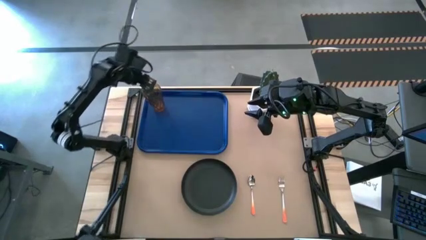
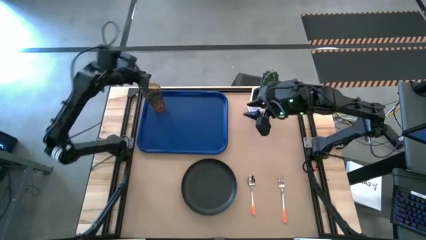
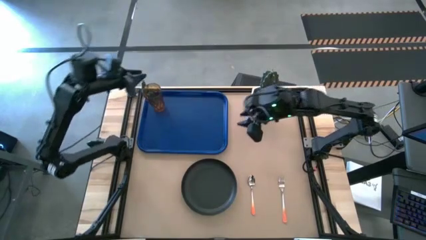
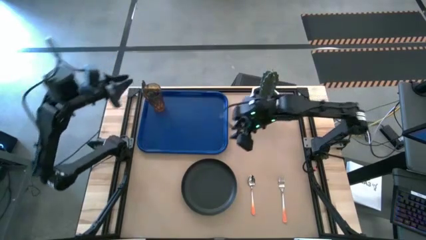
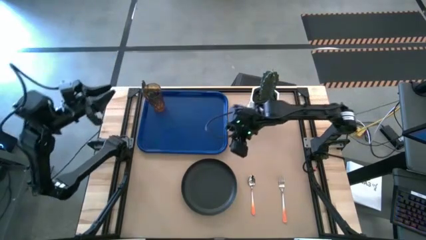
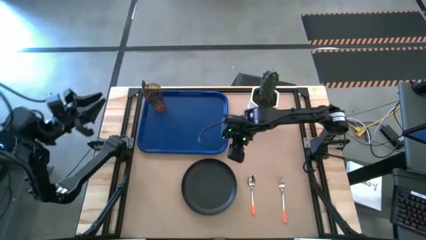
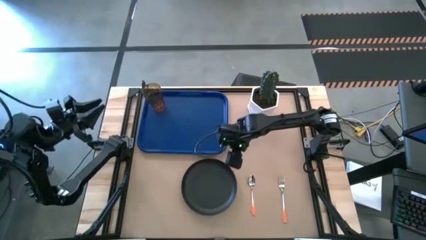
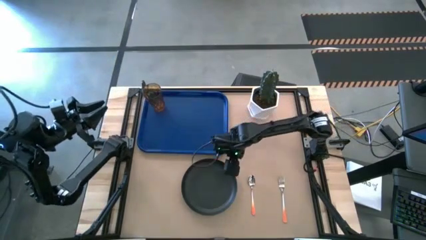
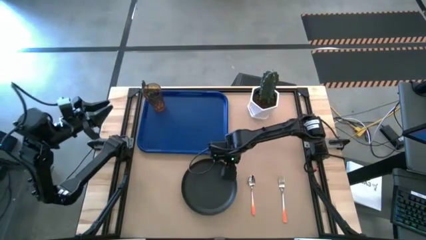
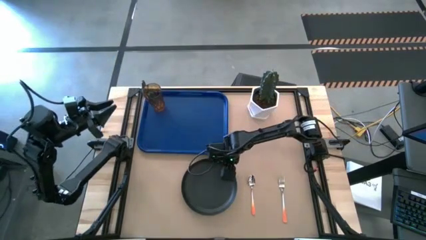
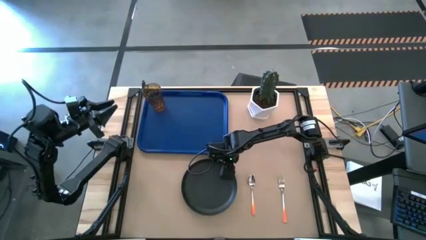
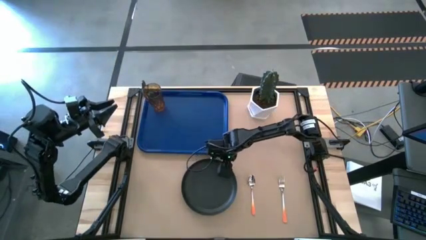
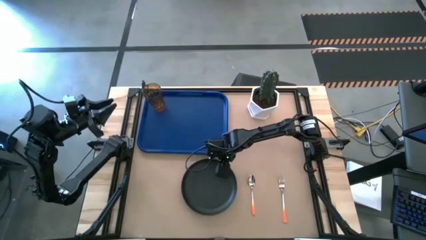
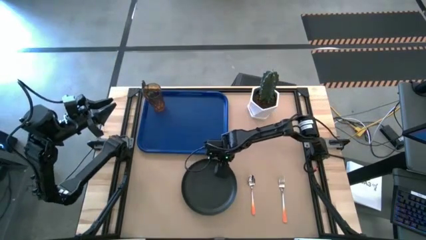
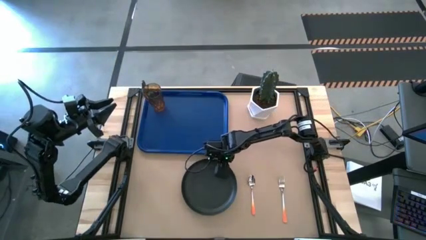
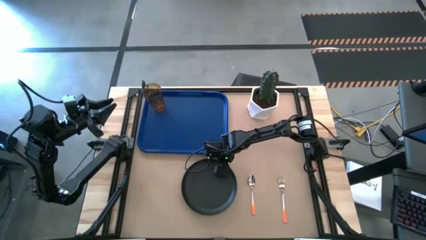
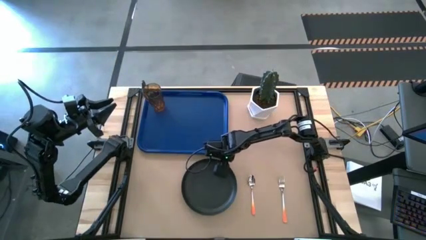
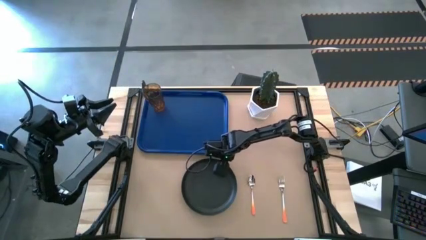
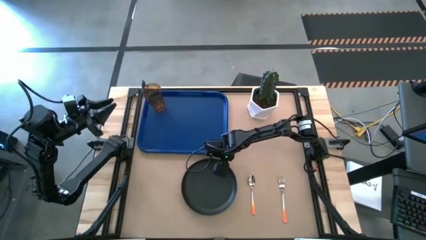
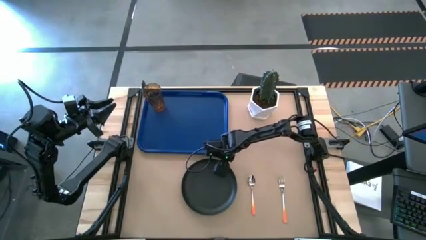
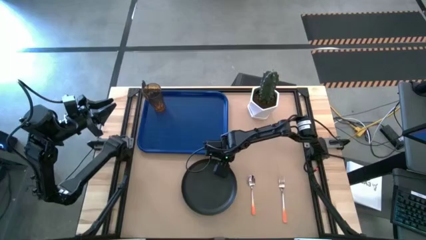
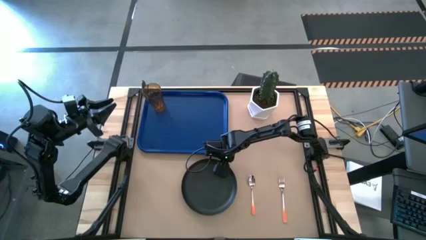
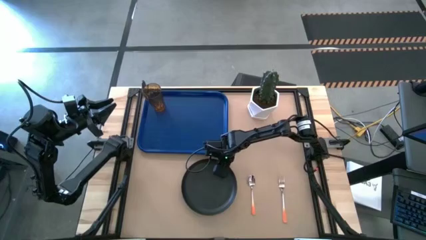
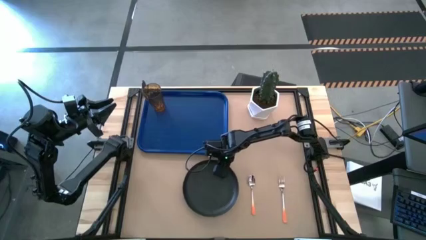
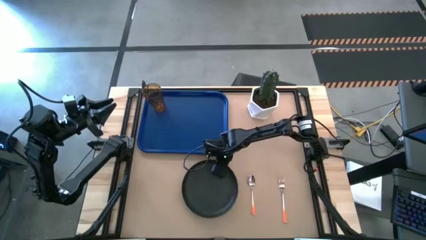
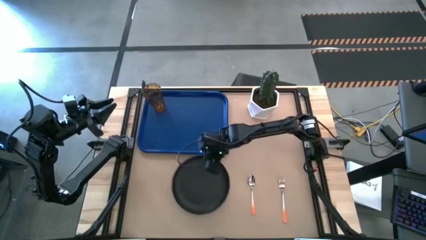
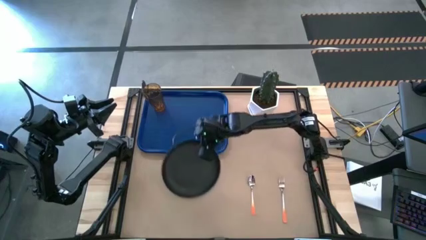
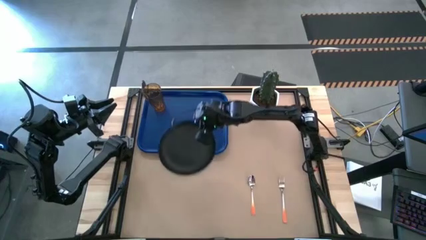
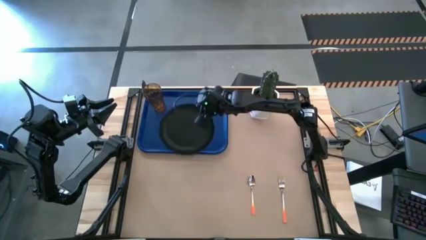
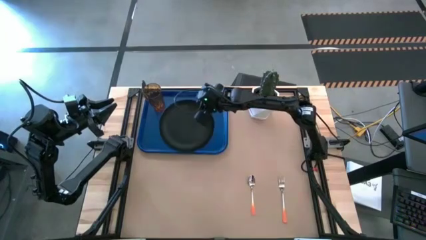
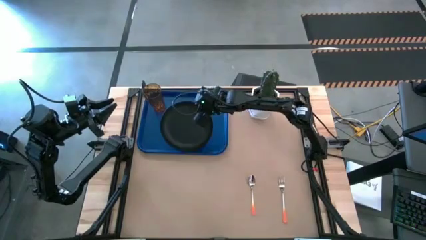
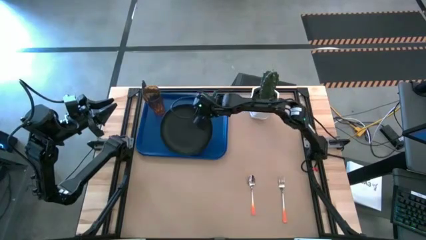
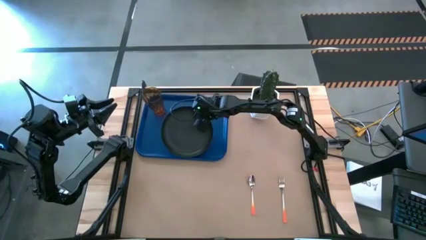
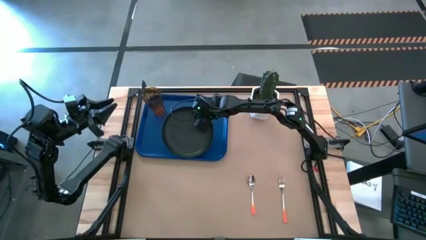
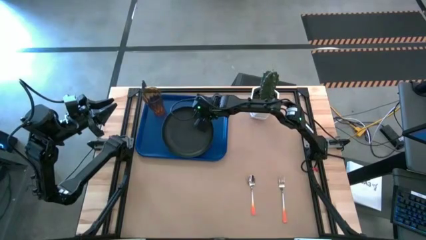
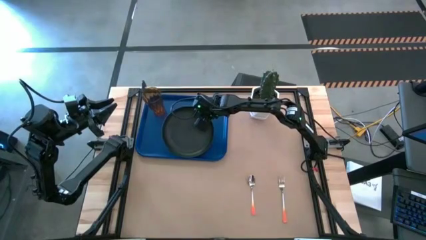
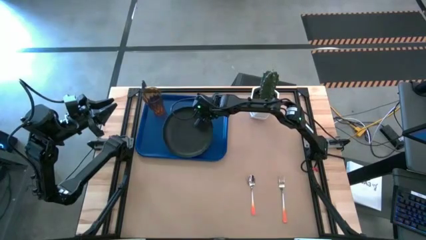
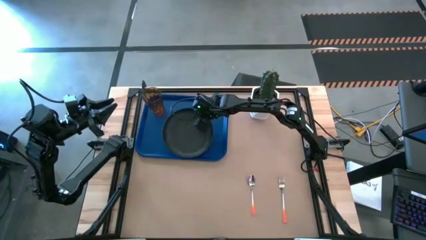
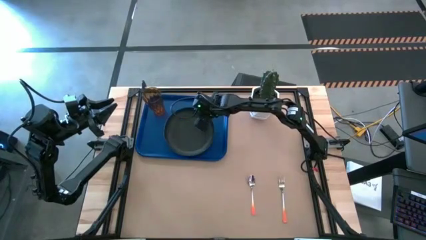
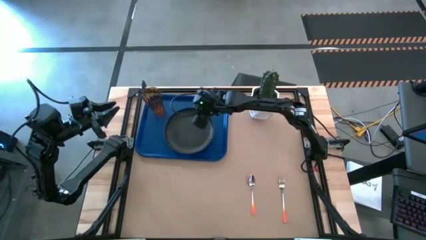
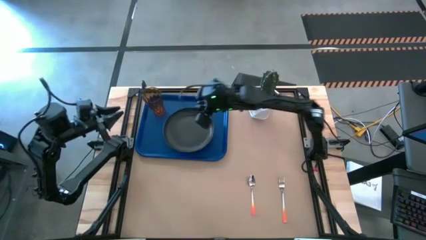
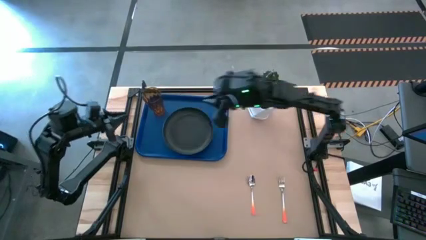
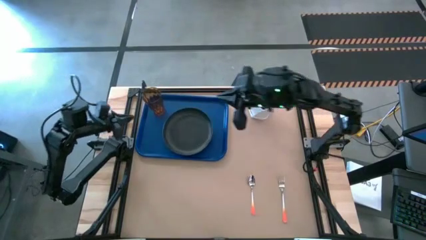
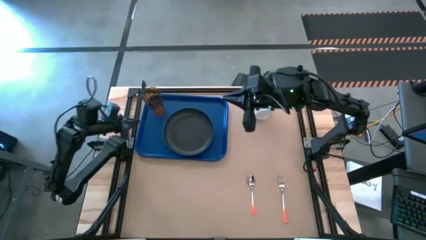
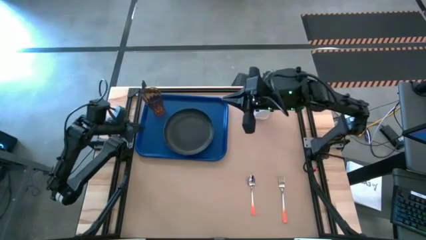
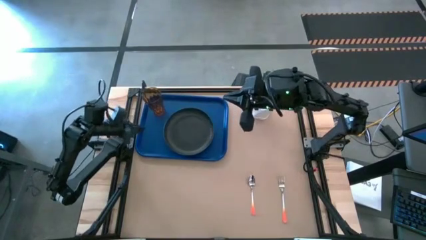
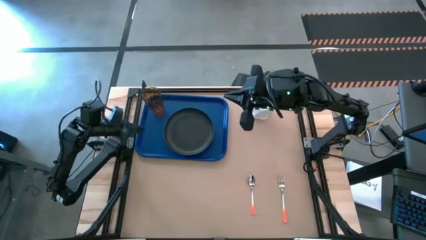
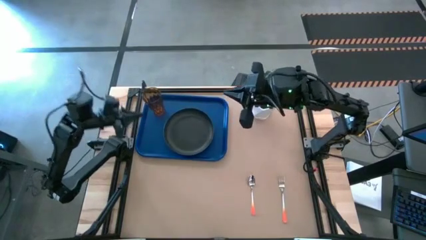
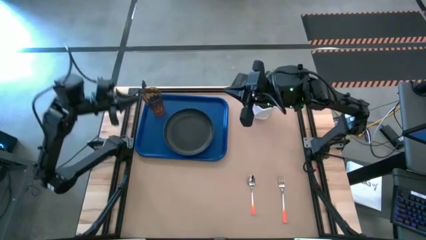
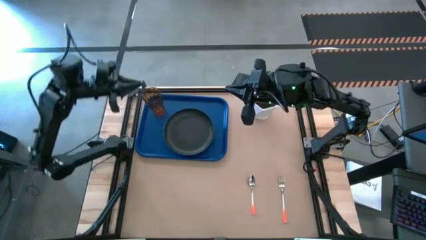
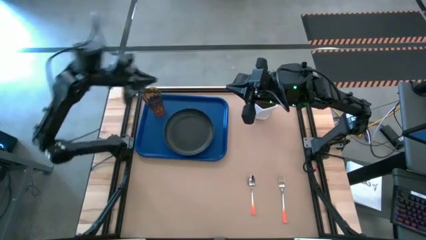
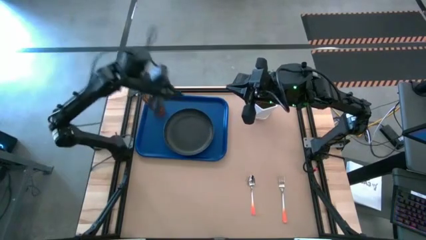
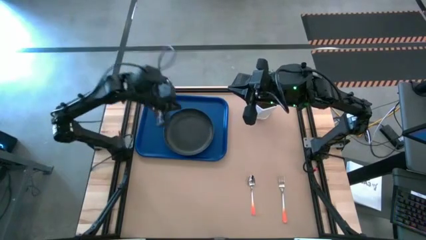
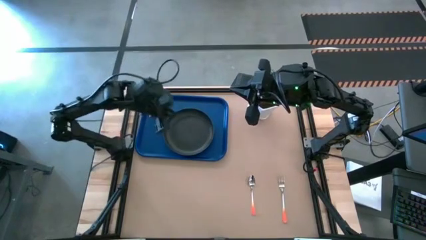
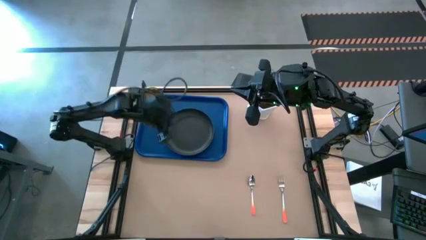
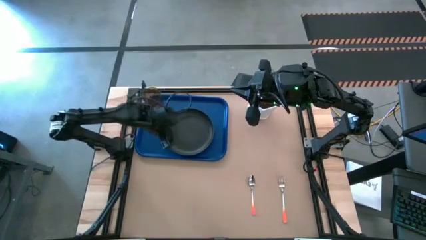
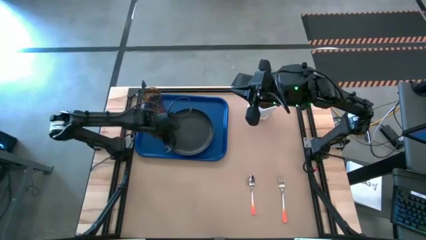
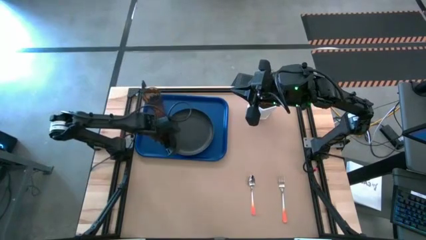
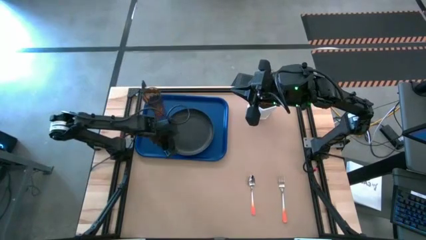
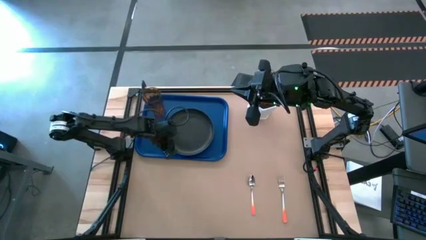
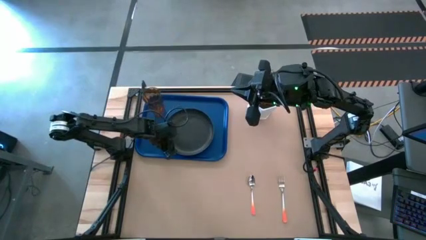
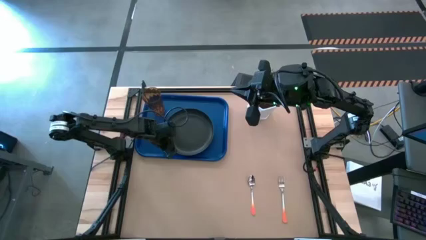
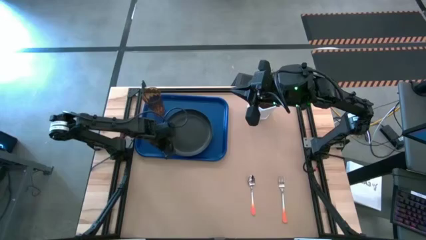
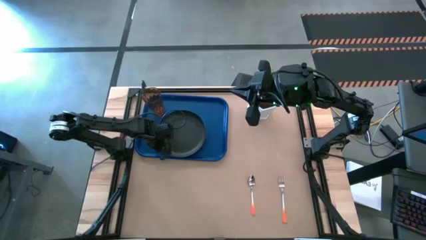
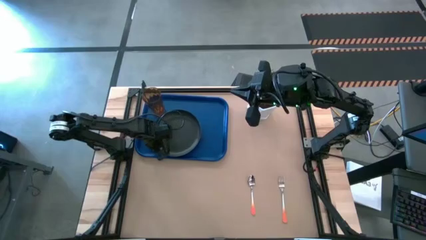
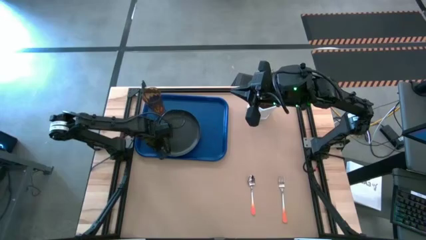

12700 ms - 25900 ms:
Task: Pick and place plate/cup/fork/spoon on tray
Put the black plate on the blue serving tray

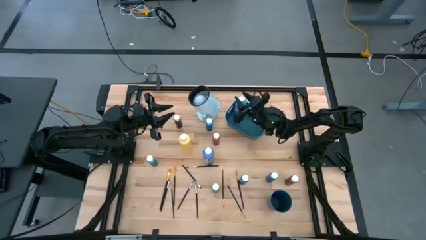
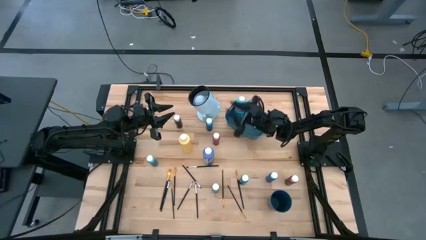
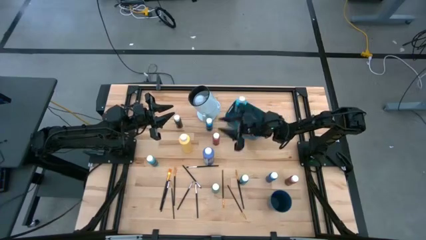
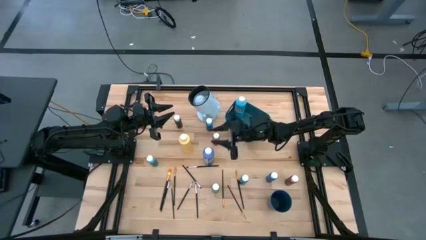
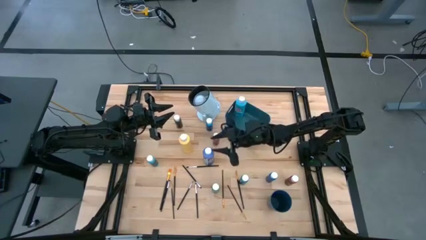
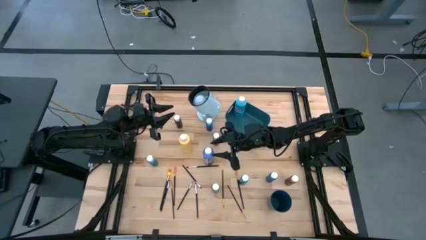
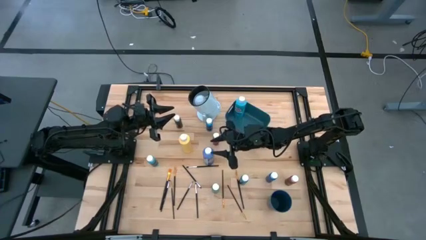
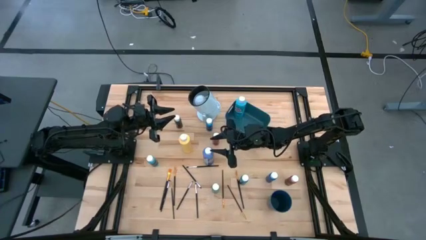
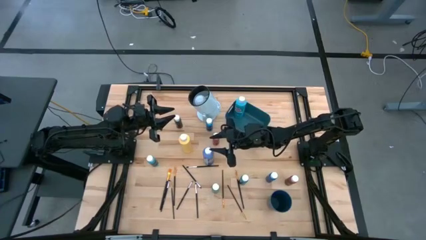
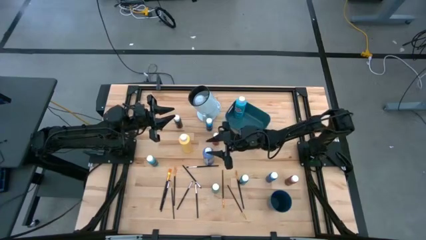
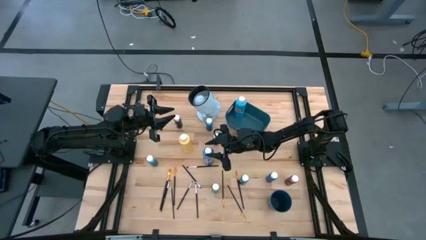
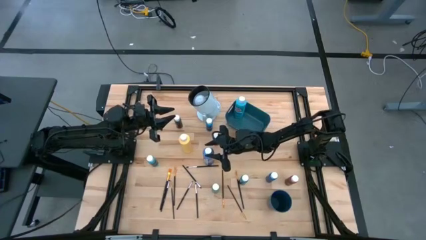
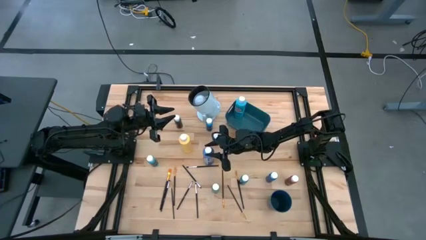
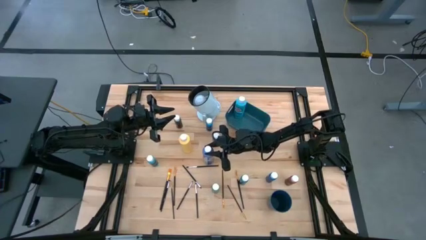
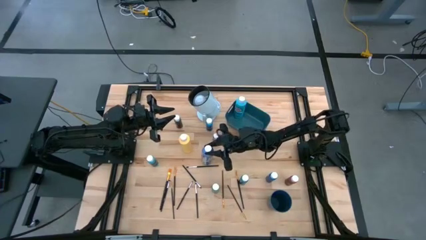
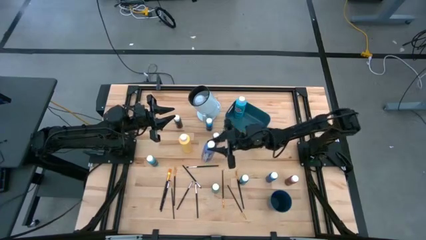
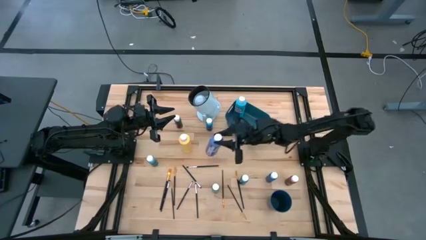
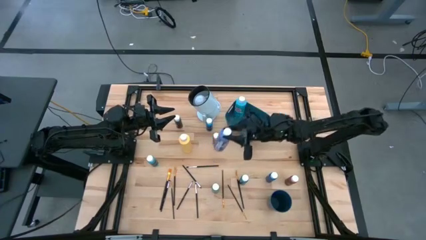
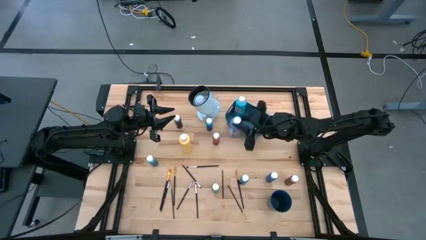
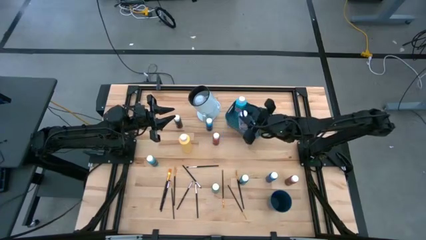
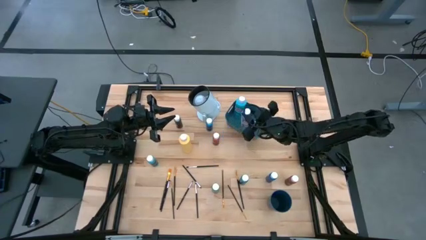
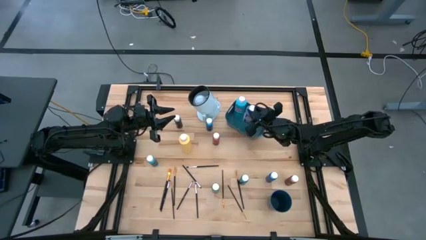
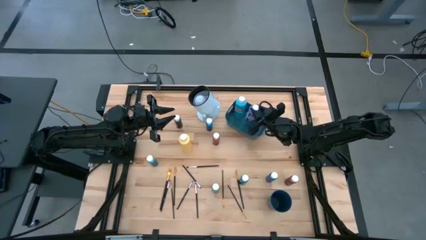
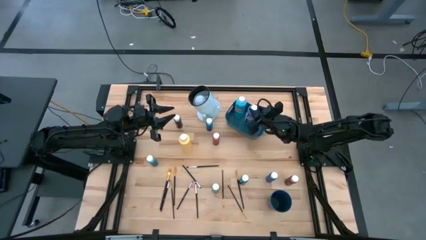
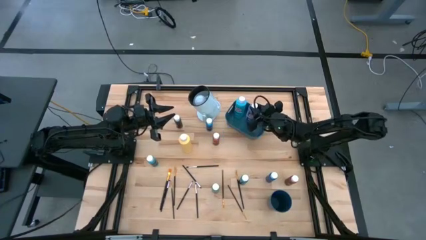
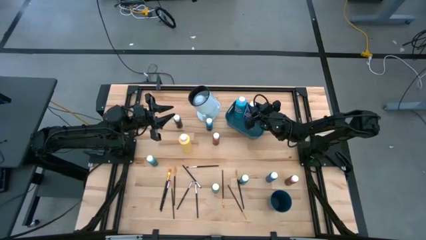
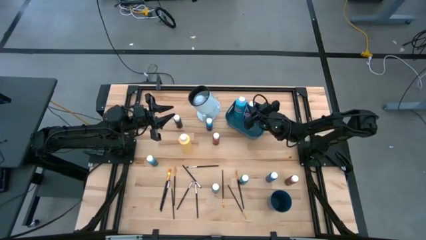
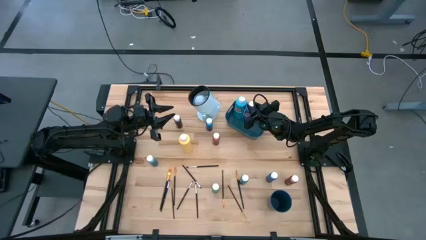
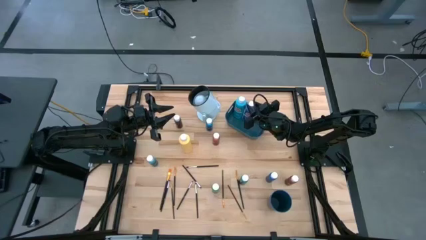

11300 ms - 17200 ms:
Task: Pick & Place Paint Supplies
Put the large purple paint bottle into the blue bin
